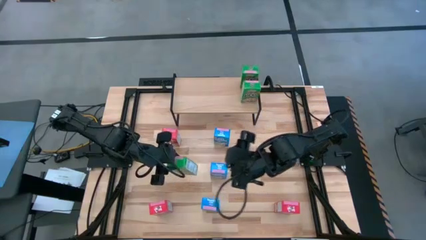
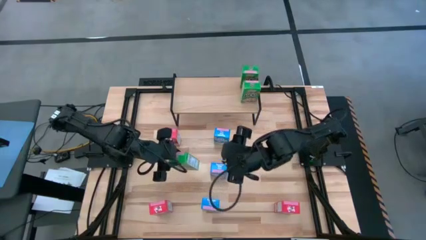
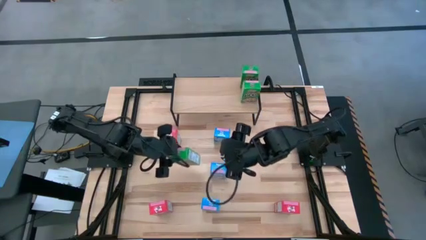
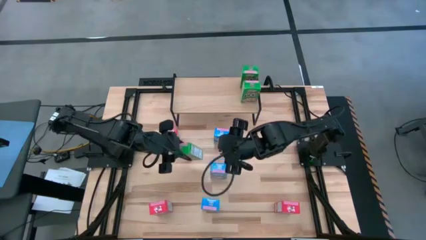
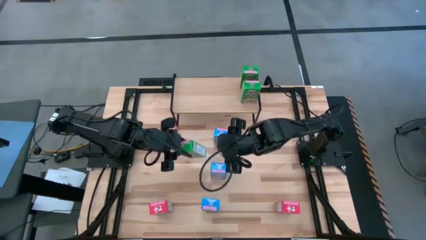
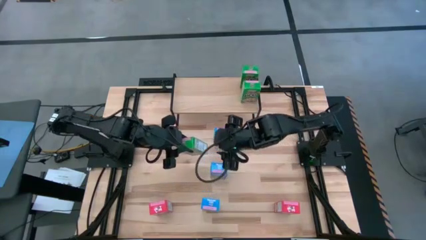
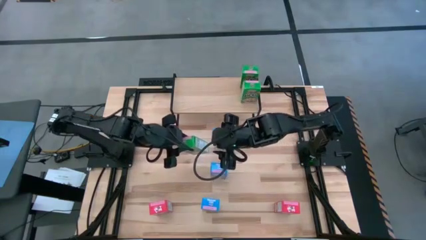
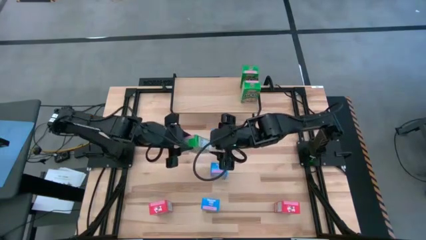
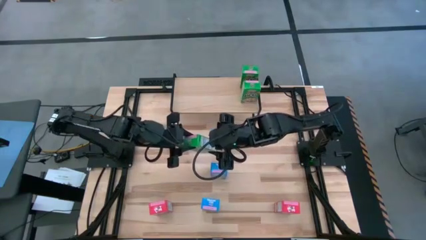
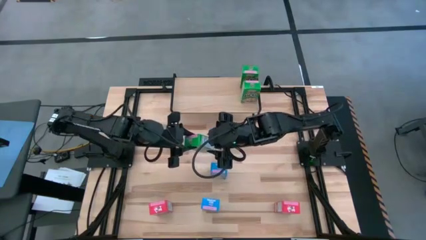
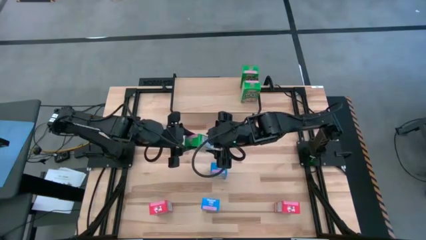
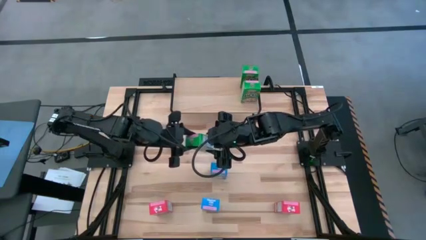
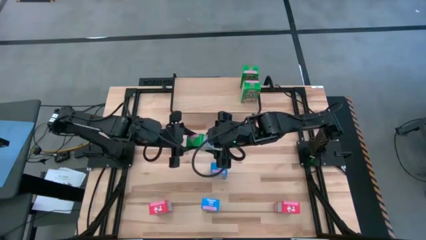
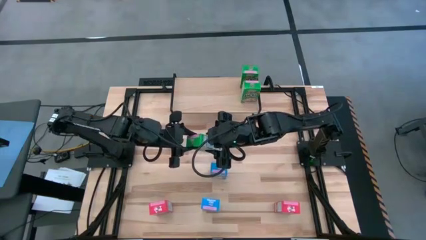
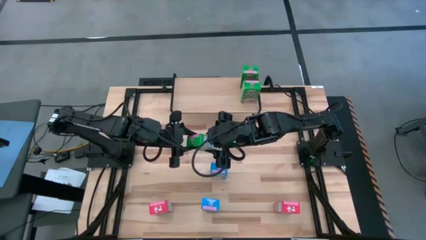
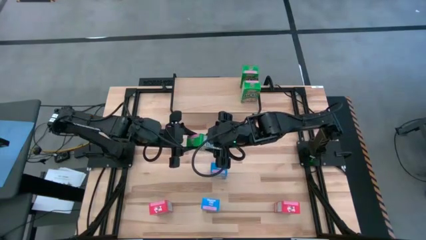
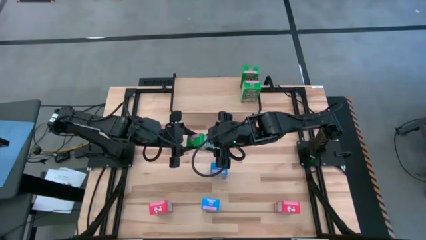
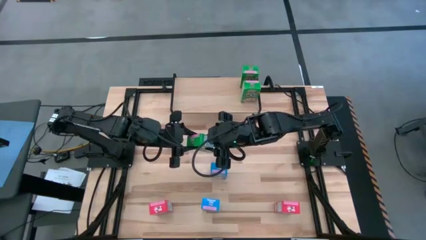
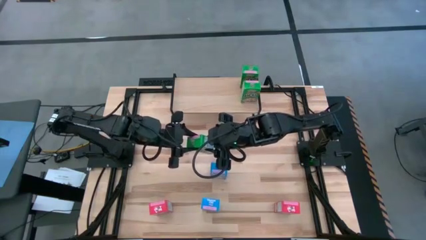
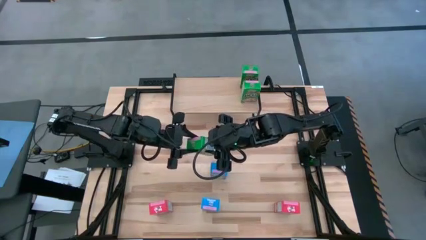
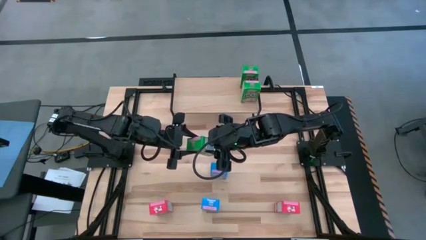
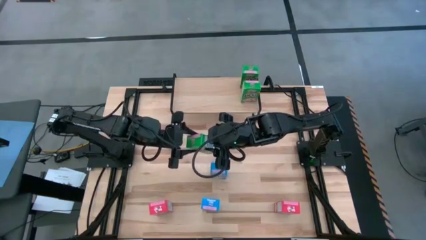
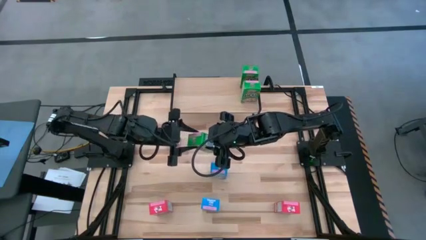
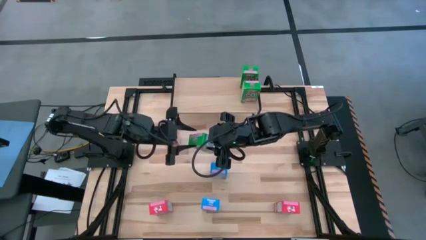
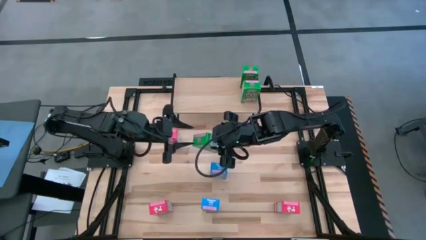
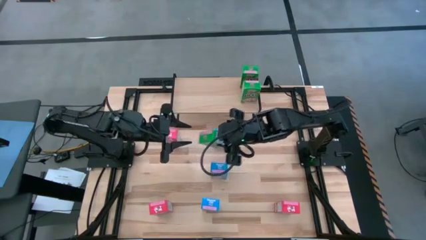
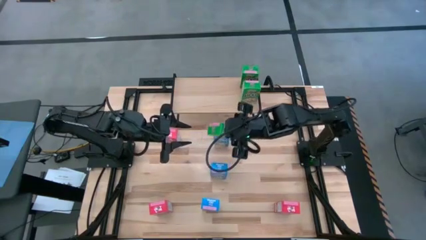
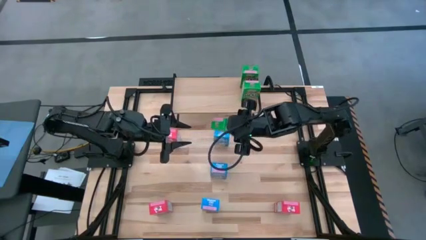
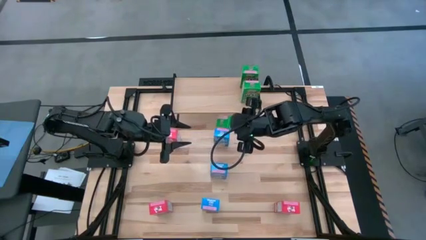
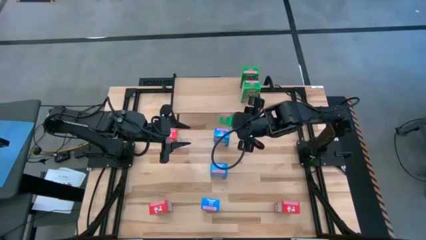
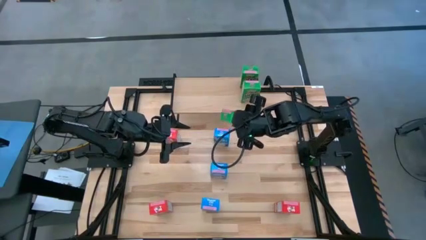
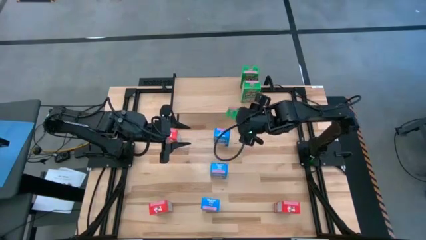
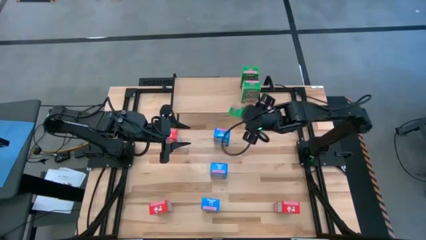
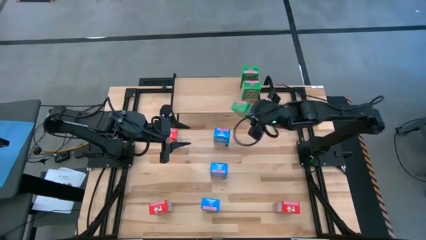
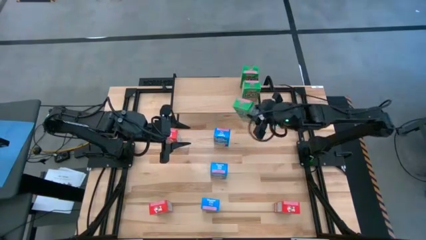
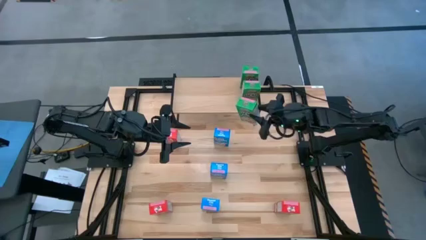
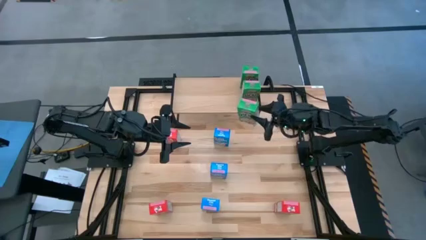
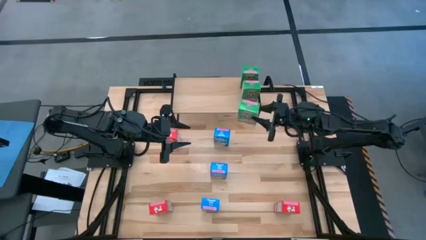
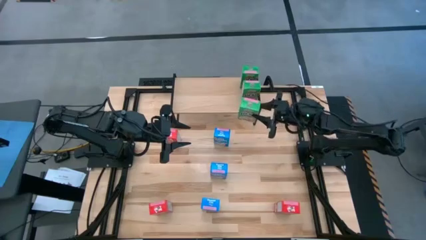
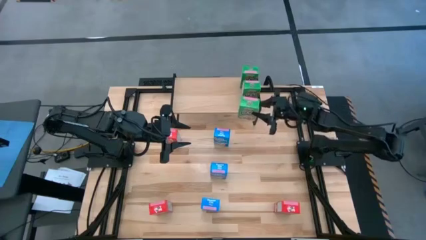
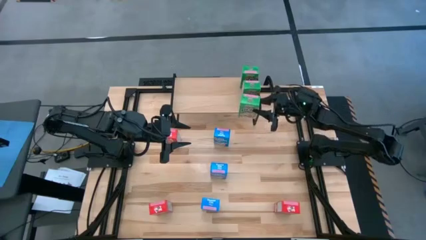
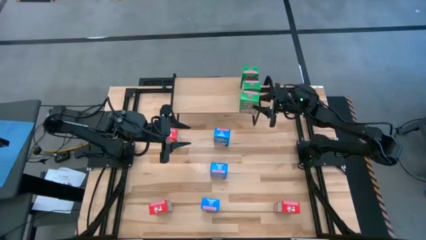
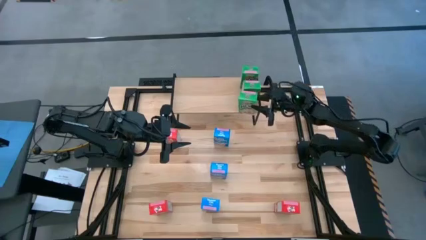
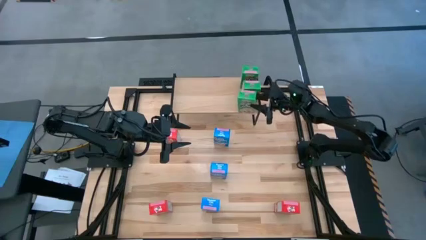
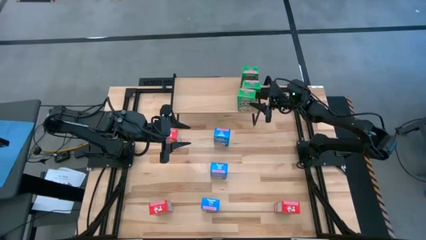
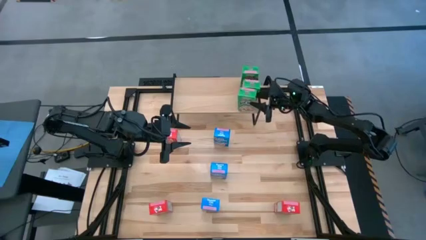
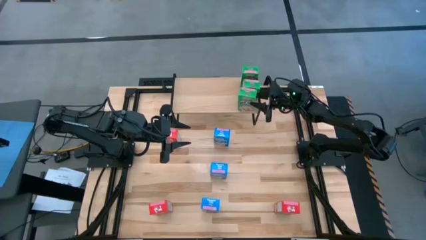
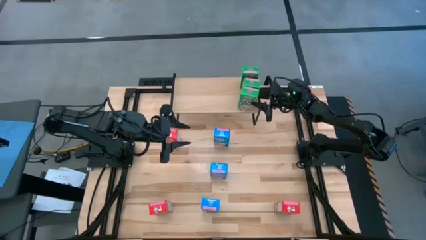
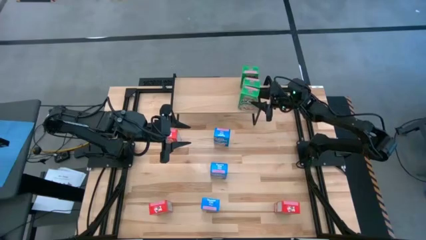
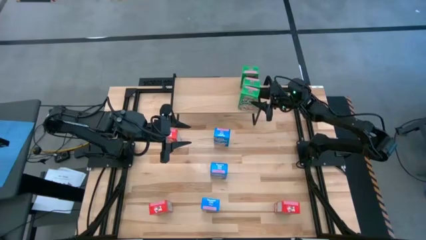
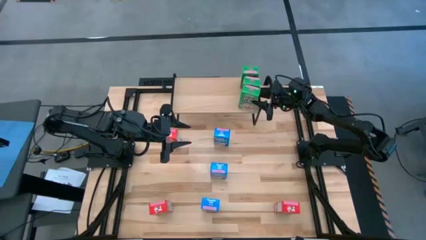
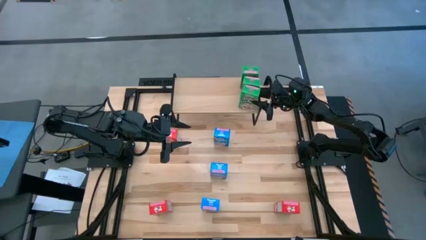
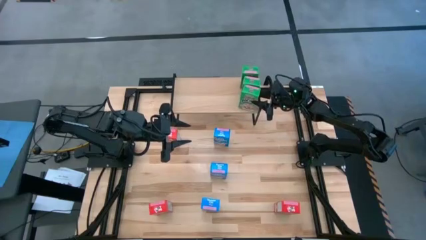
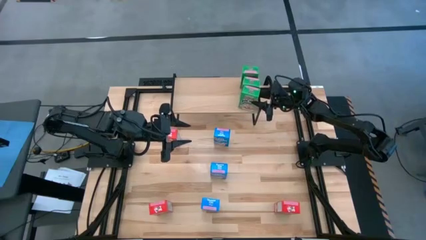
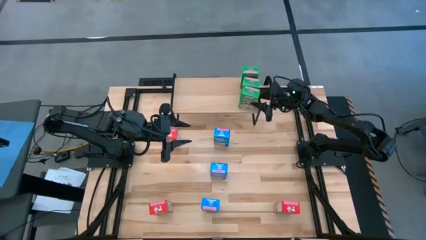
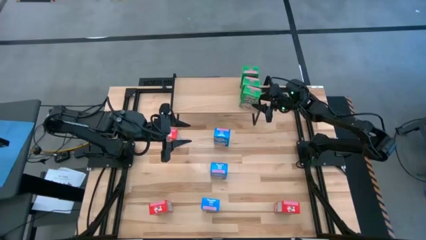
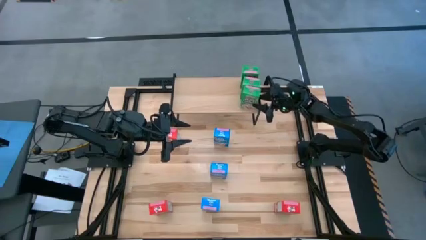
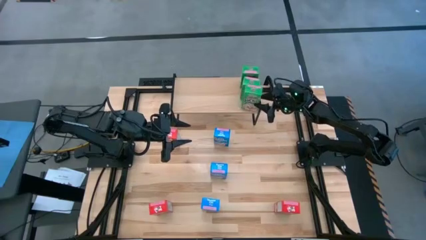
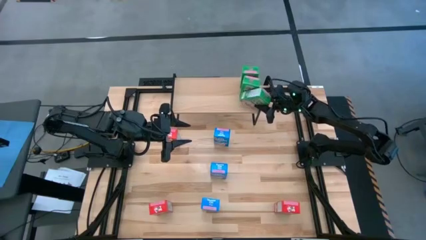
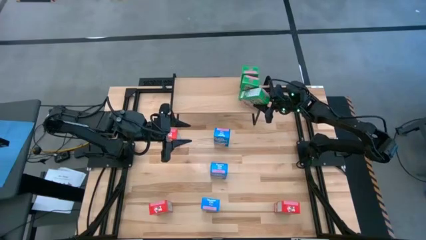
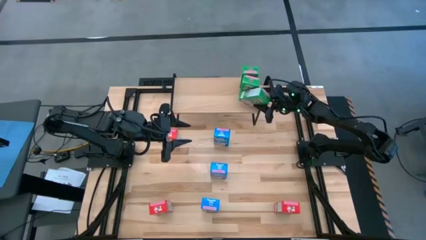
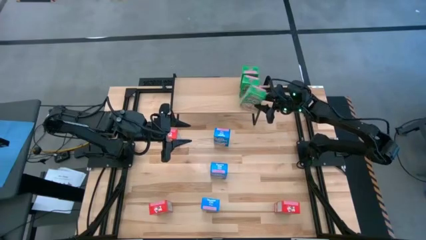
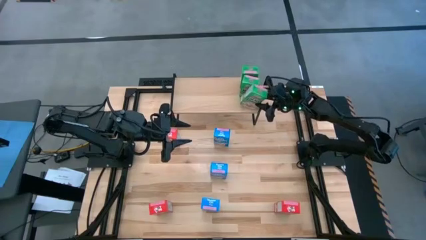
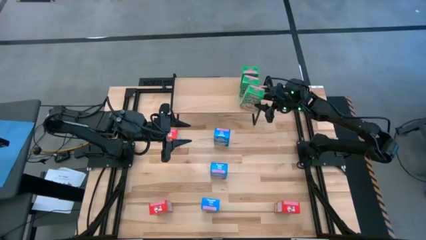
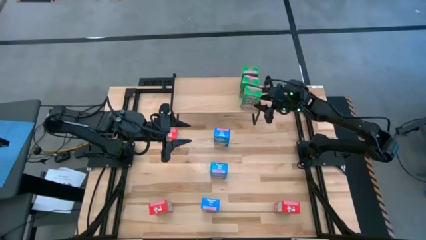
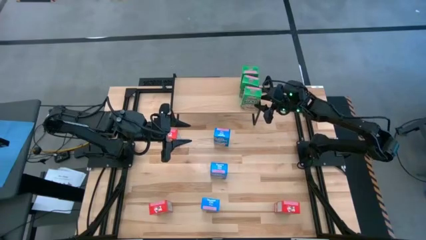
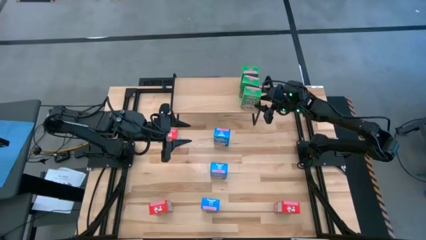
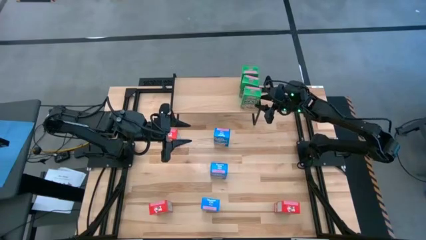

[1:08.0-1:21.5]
Task: Stack cereal on shelf
Put the green cereal box on the shelf aligned with the other green cereal box
